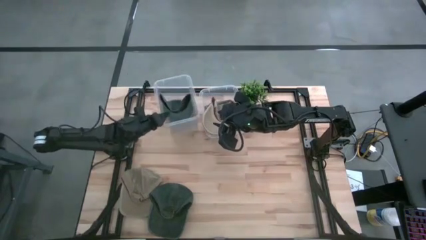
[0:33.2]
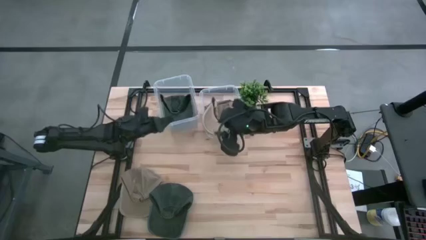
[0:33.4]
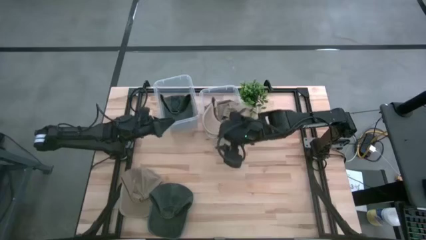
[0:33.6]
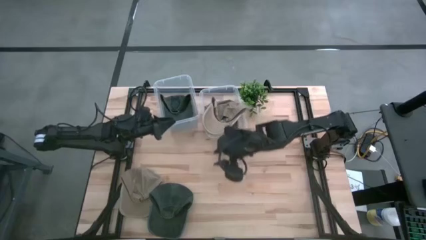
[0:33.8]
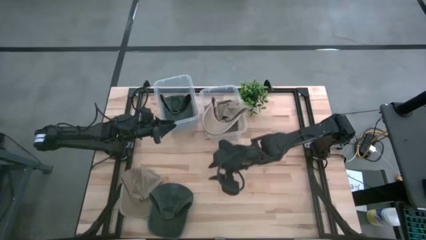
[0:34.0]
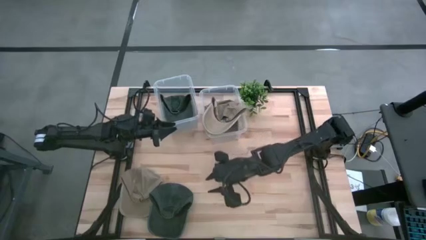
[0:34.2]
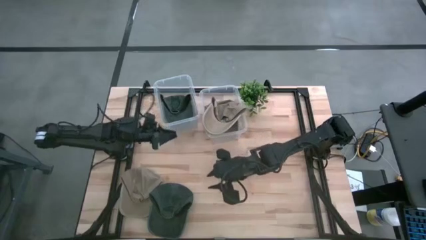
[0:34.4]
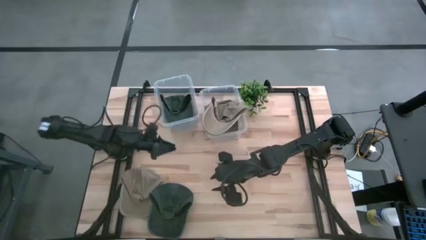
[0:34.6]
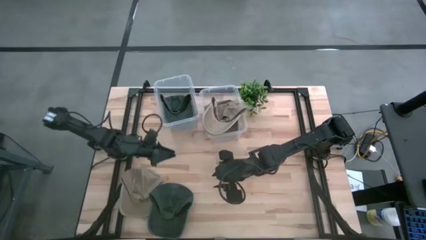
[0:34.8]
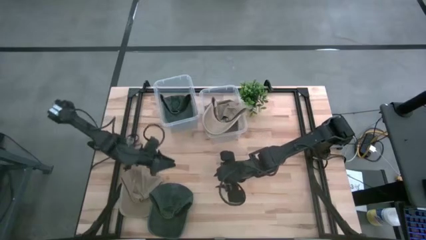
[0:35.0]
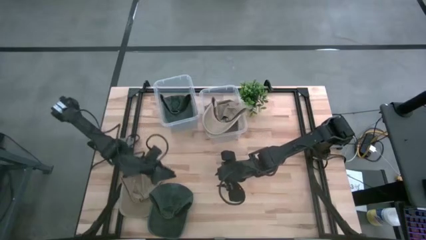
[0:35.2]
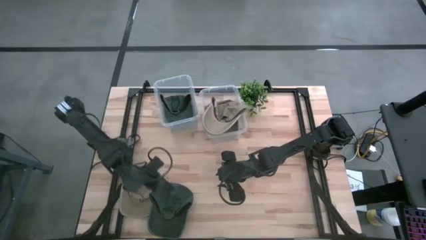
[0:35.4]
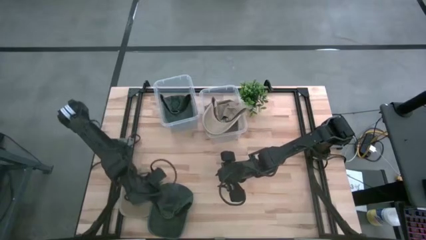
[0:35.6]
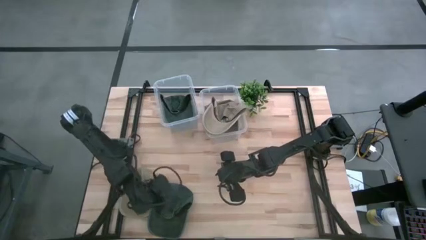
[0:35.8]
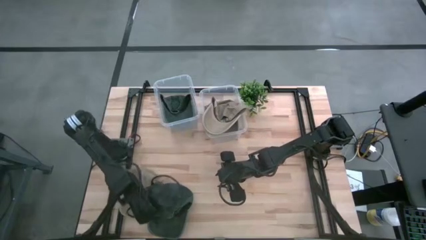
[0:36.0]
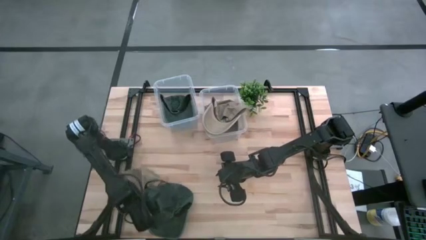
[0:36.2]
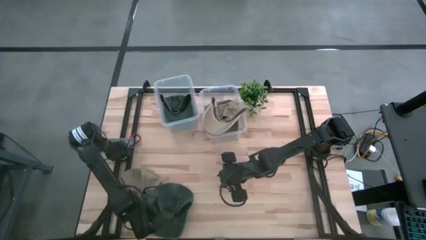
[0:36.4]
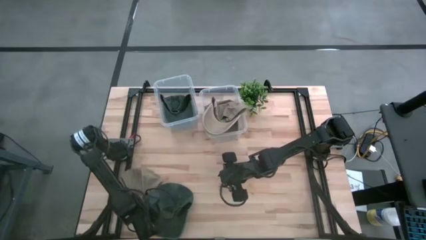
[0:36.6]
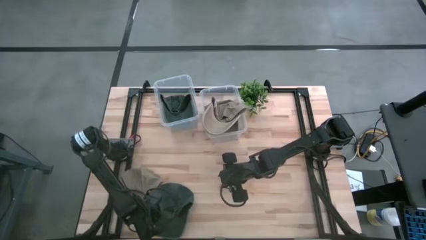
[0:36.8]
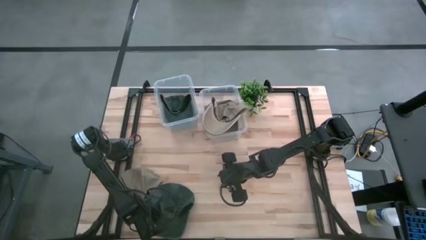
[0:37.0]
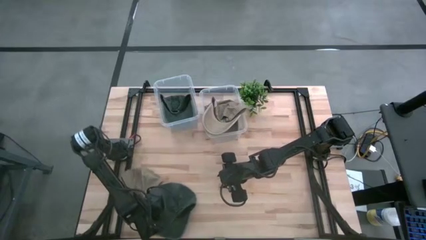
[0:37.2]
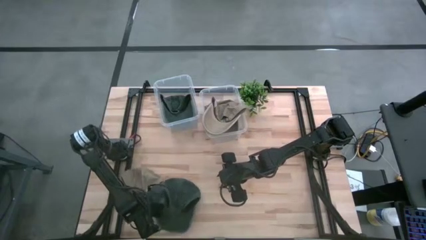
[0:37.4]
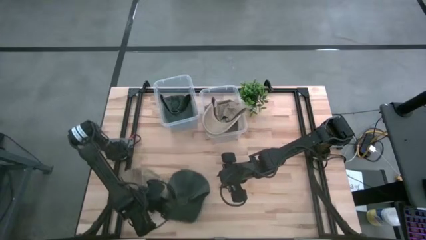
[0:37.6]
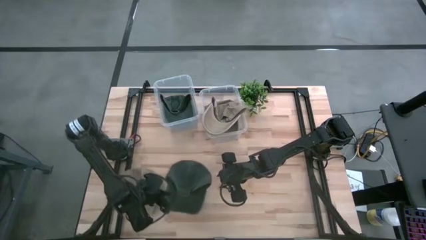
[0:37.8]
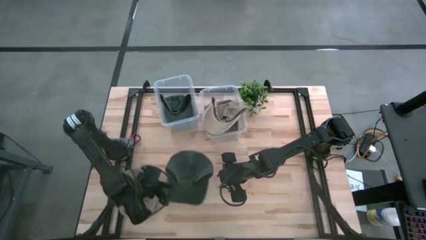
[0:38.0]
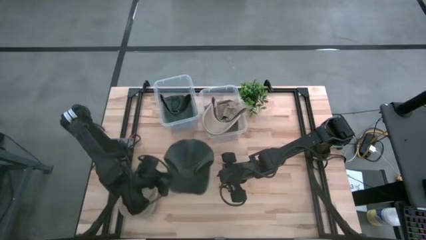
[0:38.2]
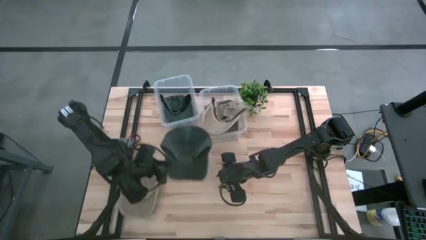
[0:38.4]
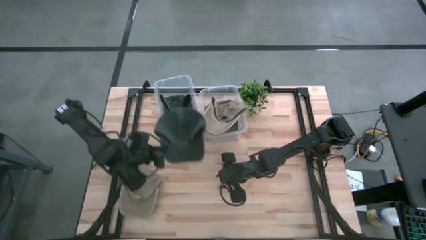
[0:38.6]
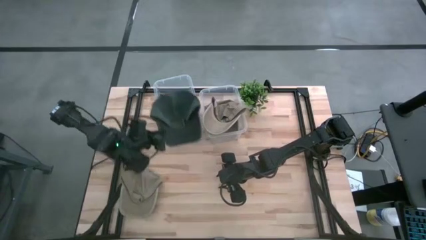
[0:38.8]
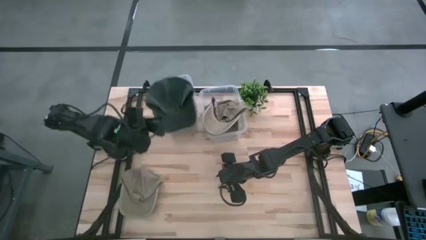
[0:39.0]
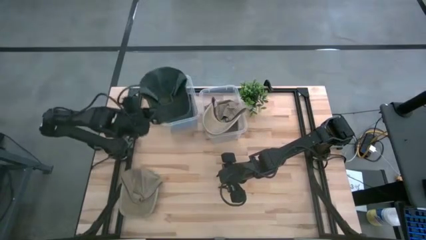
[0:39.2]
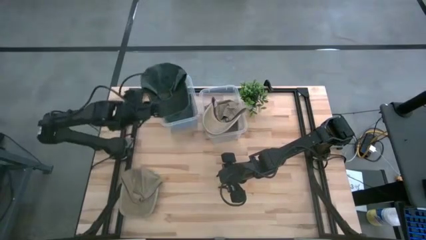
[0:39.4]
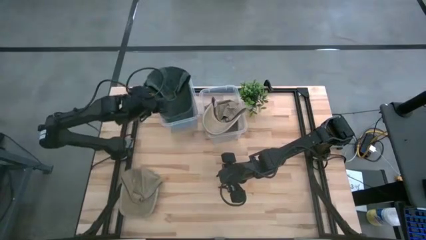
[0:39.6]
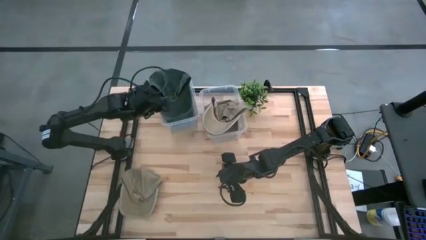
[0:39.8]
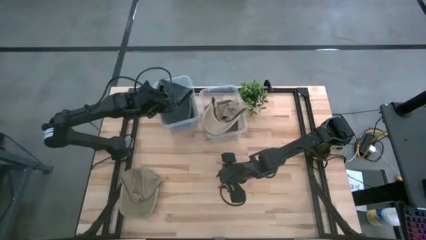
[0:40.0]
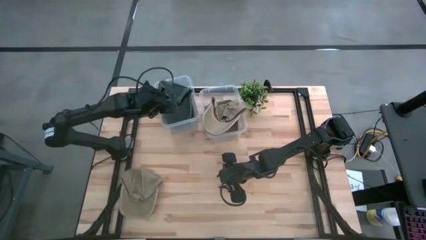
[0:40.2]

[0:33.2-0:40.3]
Task: Pick & Place hat
Put the black cap into the left transparent bin

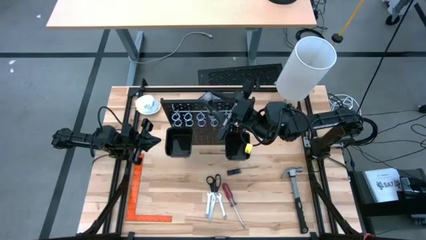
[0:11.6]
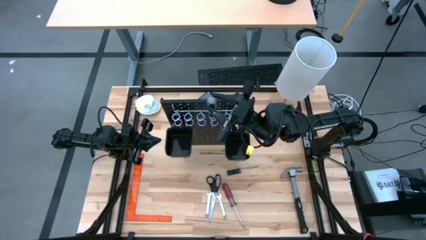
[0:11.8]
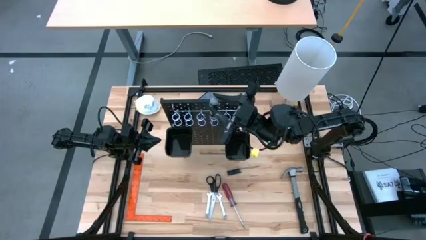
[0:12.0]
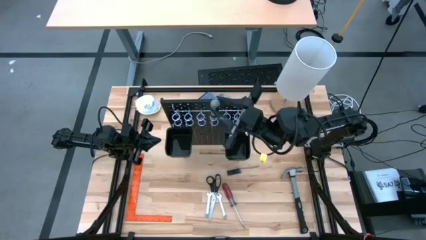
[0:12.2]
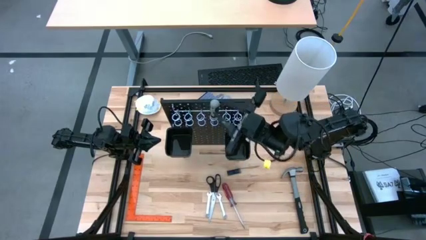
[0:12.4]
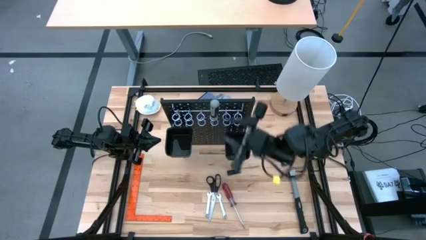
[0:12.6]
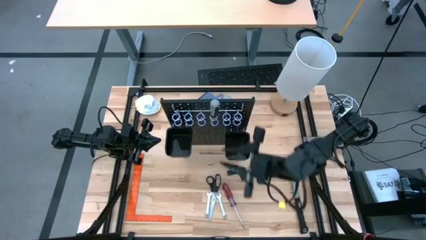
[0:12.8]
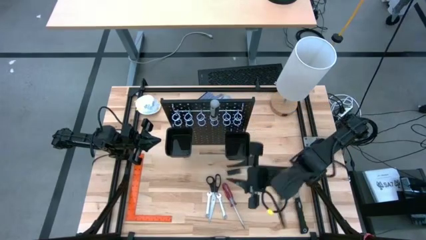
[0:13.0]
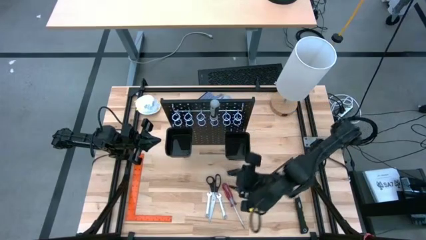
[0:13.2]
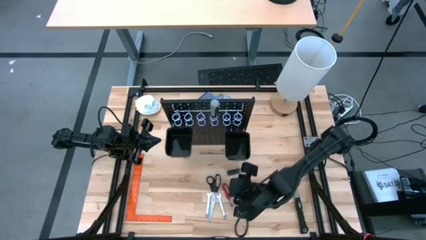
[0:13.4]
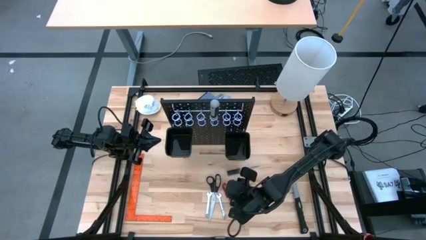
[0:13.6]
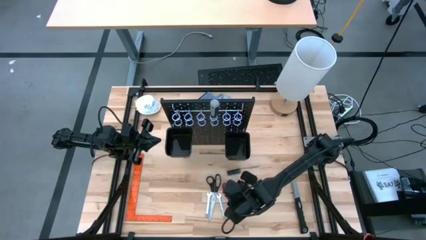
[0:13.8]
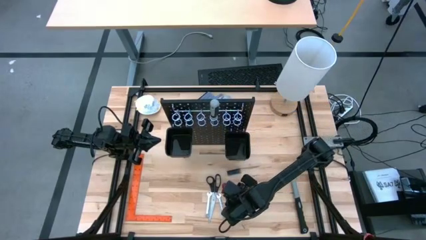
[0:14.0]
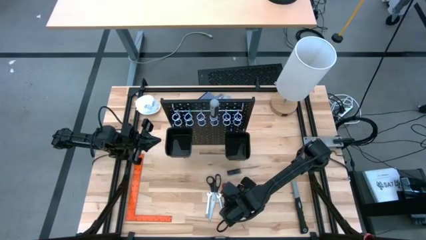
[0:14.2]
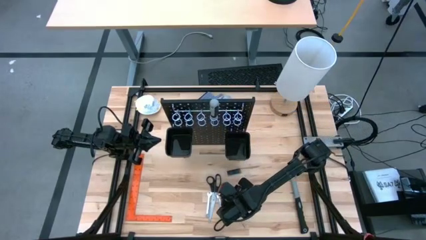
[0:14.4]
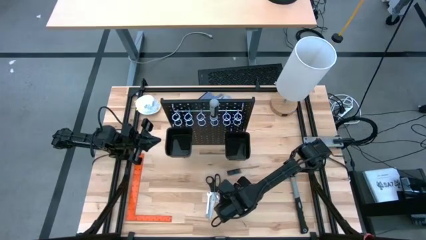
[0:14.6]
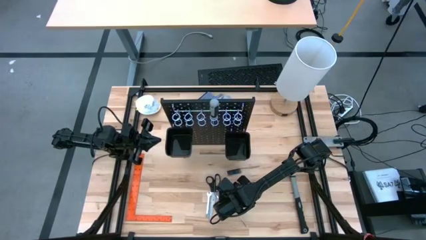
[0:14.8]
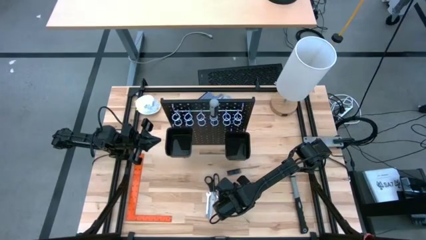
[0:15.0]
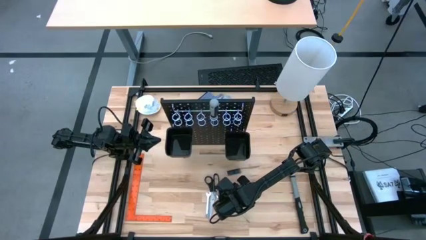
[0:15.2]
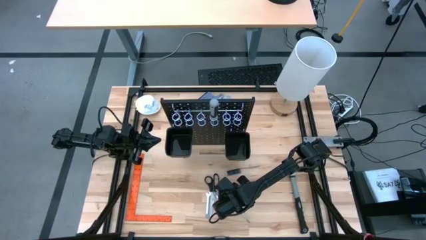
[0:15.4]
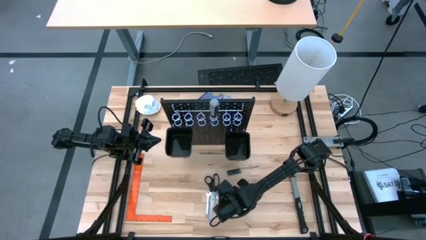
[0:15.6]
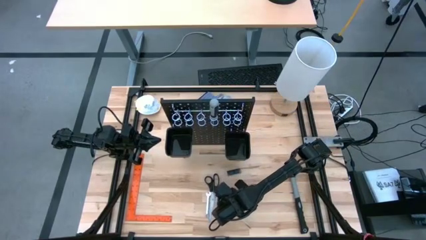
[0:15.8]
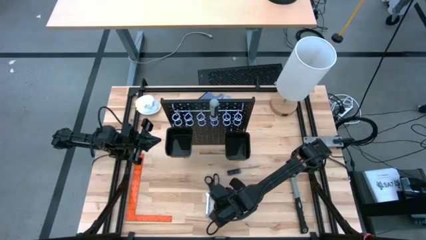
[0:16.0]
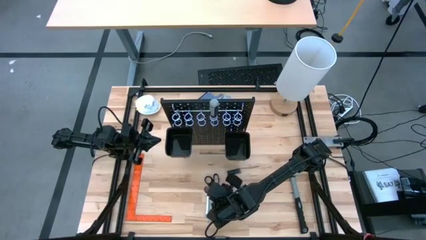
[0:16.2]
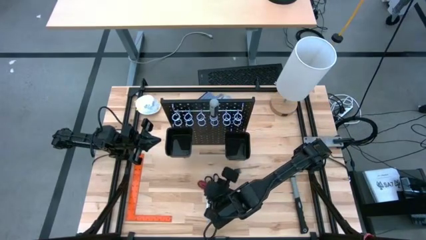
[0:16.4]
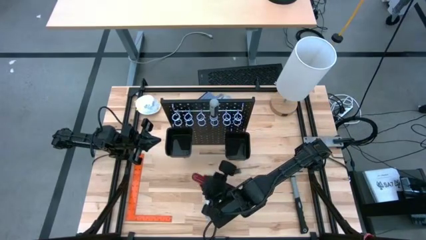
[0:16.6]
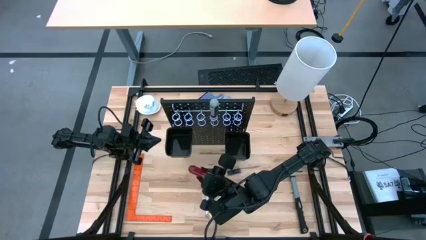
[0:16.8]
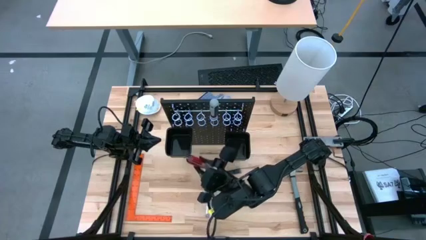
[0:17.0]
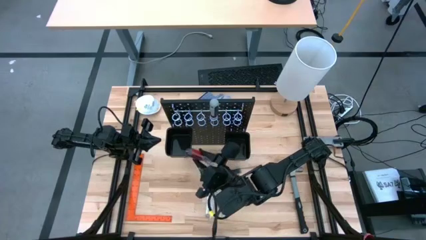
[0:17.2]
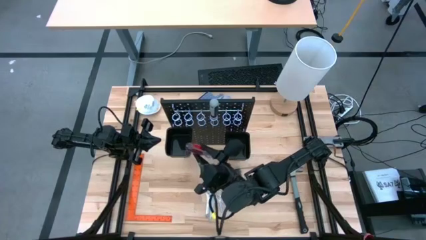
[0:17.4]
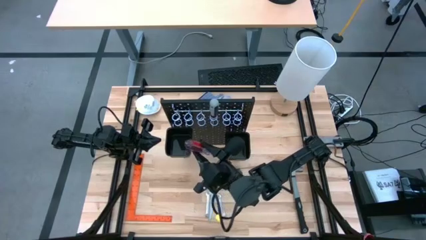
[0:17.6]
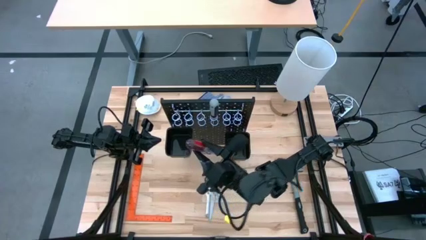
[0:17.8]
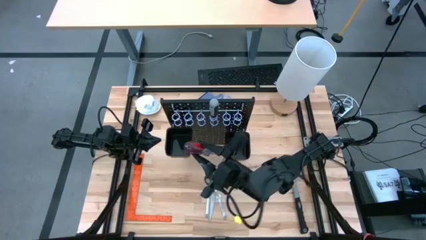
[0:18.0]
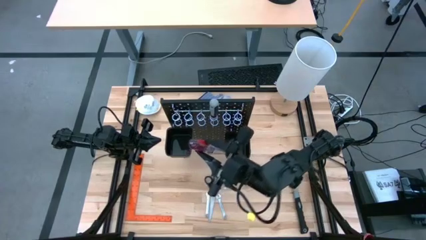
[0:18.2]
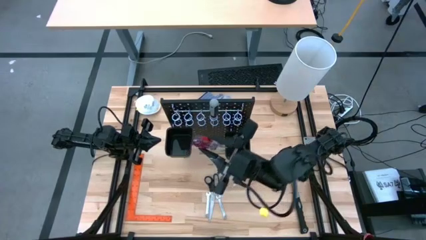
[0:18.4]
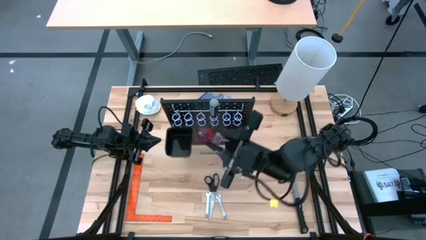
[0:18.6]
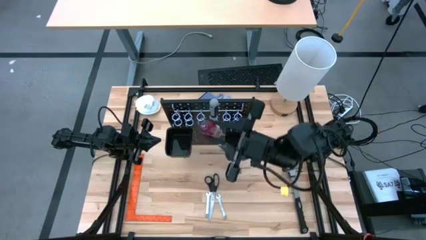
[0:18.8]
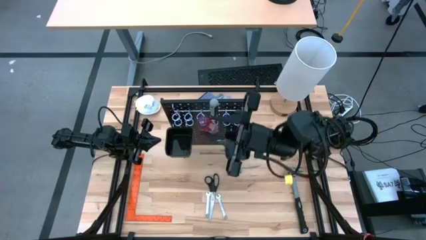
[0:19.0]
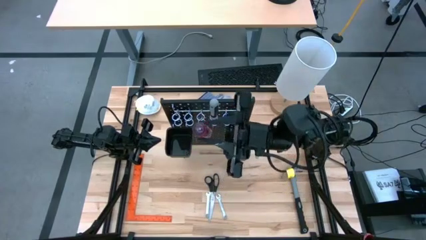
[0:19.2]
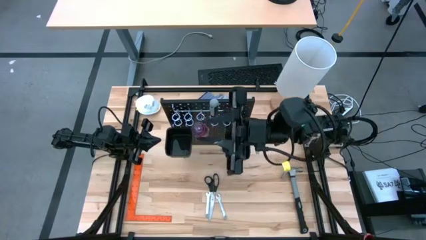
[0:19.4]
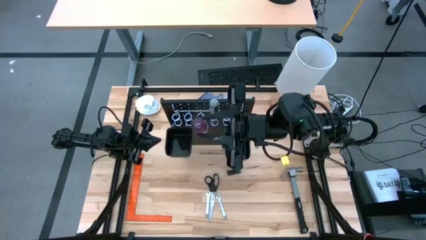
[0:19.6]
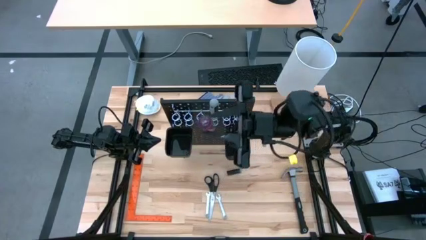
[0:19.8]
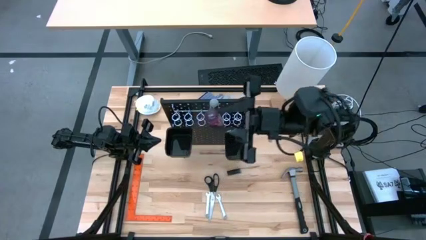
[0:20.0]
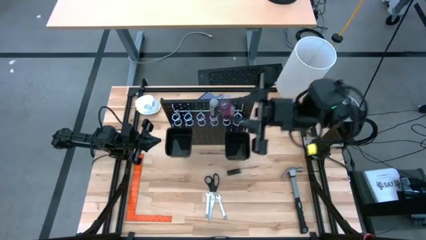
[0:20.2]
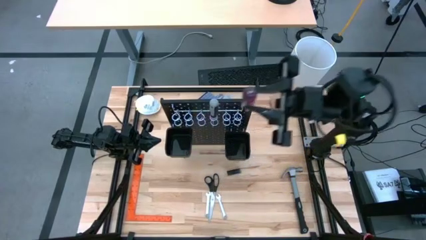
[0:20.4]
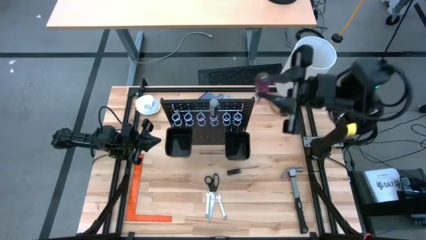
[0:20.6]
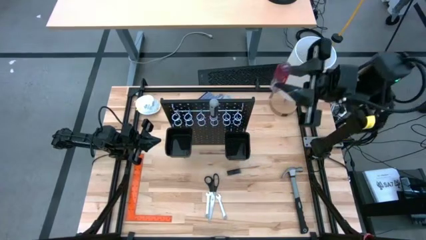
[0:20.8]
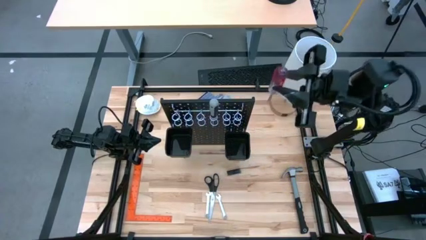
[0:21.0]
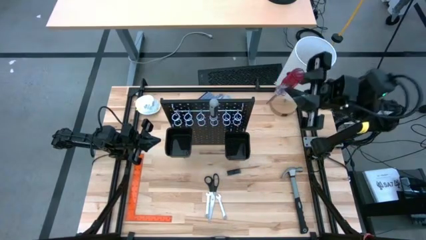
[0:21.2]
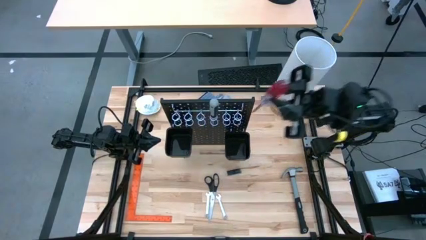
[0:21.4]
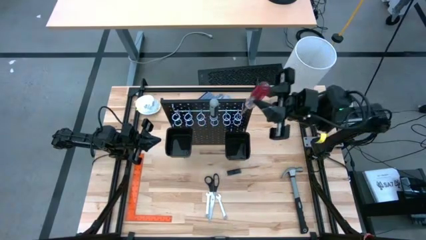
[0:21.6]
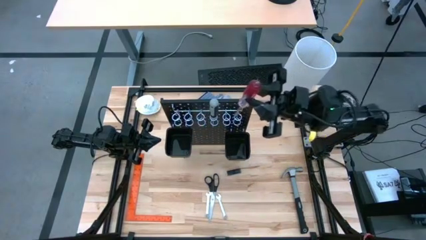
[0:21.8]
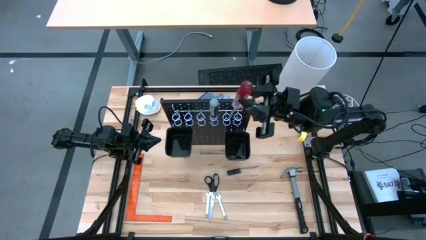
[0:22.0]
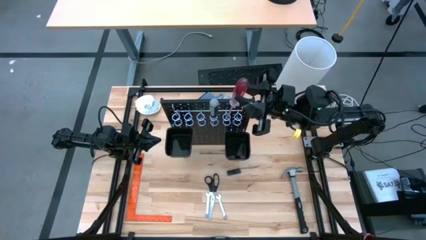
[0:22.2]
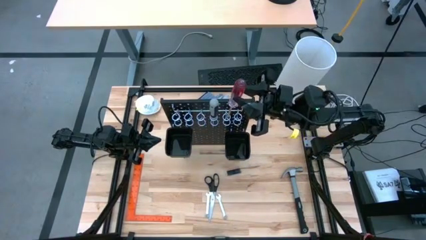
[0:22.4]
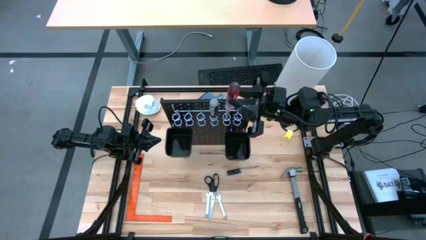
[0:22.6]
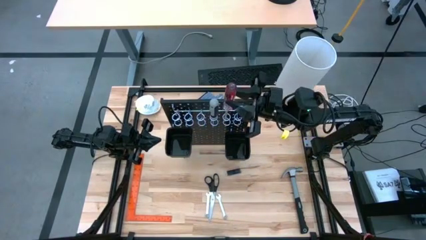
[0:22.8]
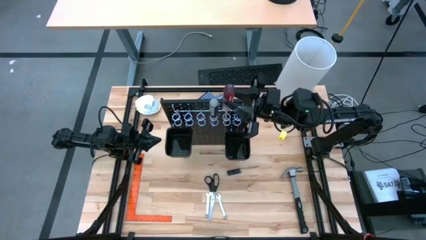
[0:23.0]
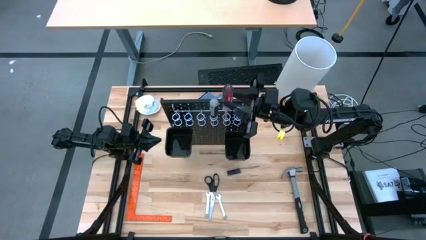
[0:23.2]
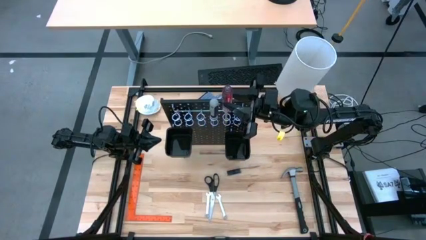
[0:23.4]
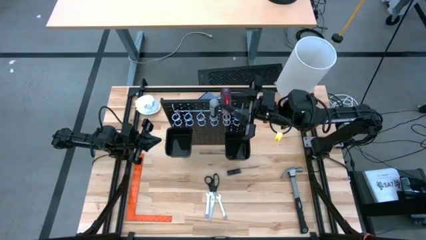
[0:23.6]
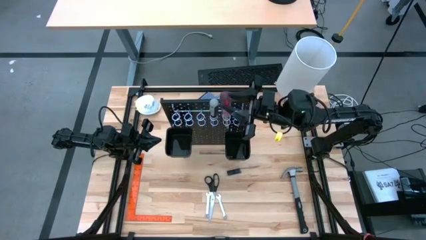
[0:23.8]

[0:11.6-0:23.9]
Task: Hang tools onto peg board
Hang the red screwdriver on the black peg board
